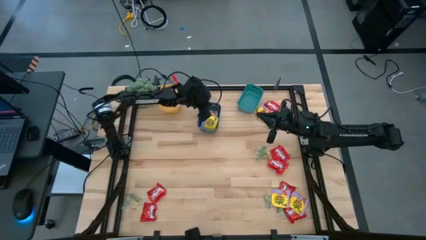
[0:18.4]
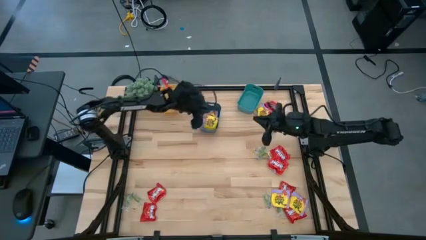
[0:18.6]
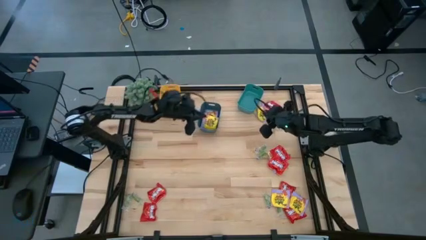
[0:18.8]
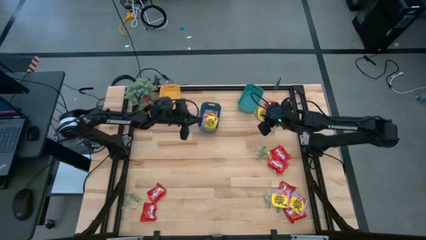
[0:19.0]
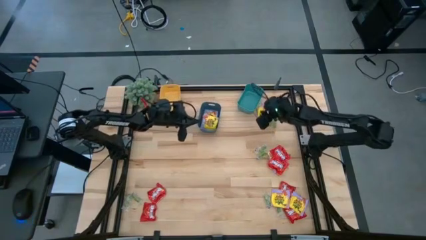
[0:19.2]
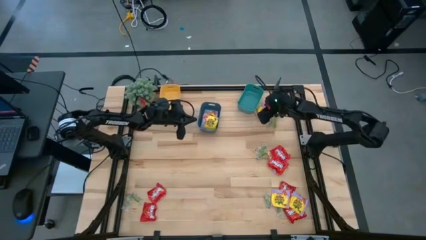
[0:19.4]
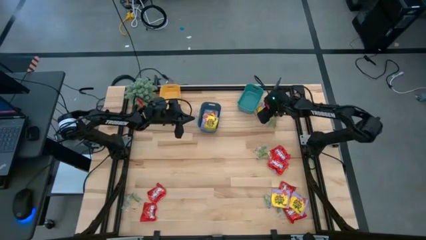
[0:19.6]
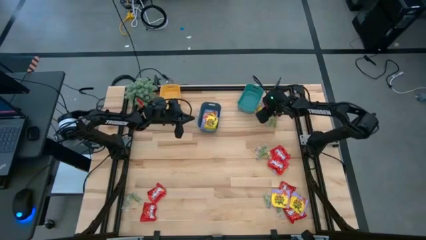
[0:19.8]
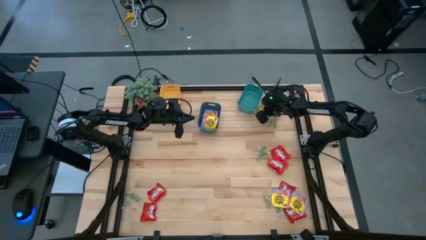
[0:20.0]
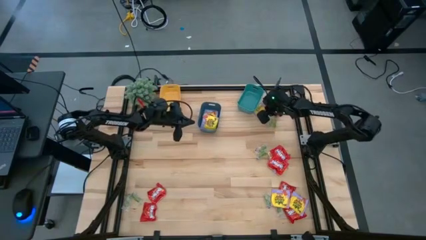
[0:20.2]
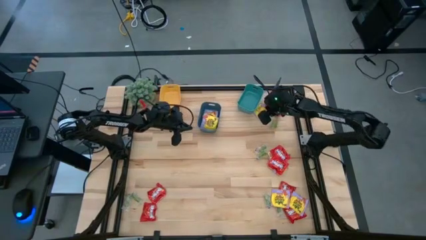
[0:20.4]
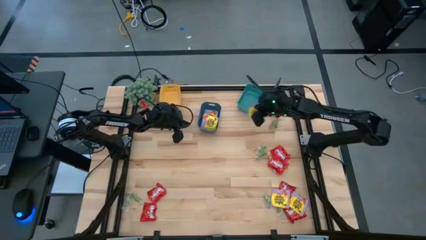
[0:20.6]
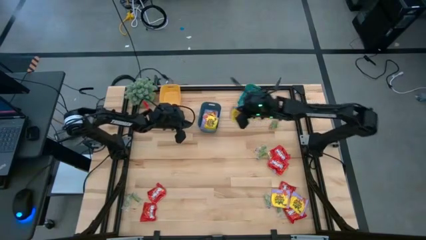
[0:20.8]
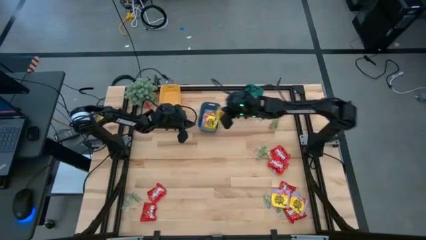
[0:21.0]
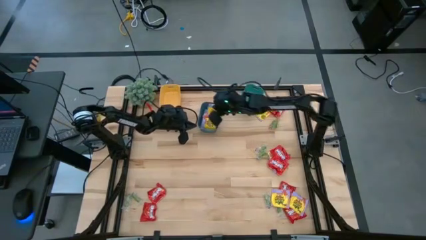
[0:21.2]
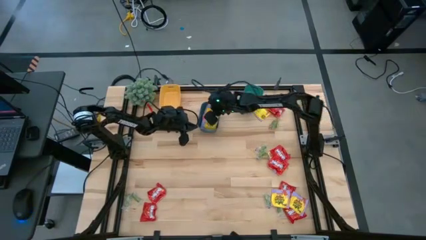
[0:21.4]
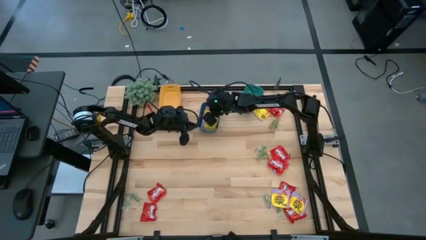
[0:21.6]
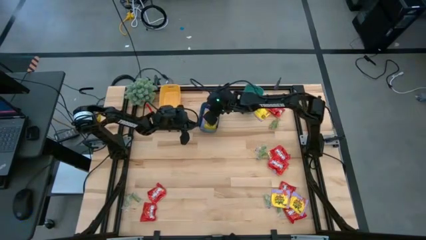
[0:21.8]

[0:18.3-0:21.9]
Task: Sort candy
Put the yellow candy pack into the blue bin

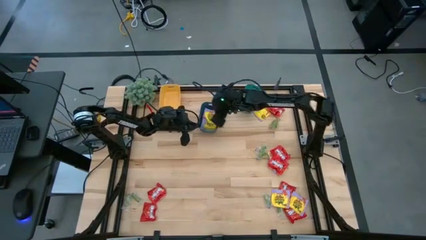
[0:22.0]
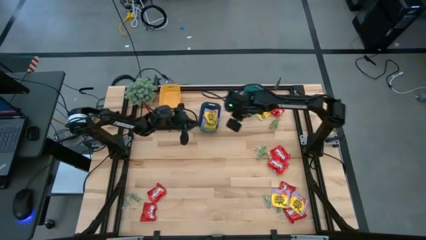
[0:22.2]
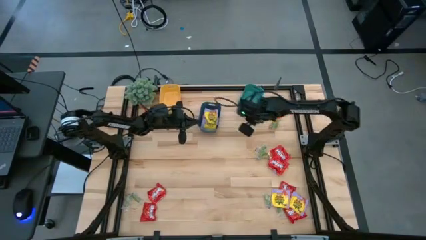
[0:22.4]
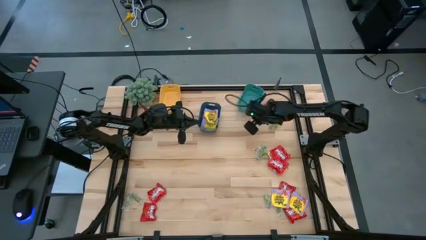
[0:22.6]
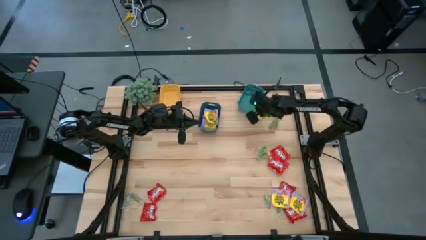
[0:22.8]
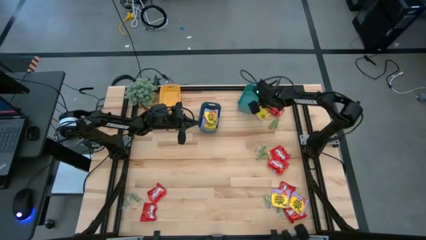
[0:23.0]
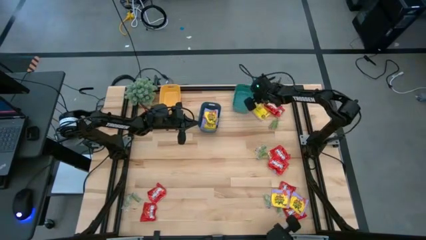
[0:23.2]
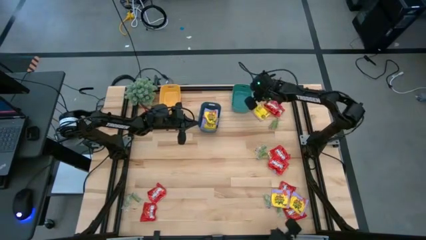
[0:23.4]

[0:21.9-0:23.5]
Adjust the green bin

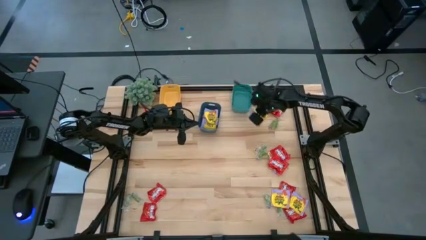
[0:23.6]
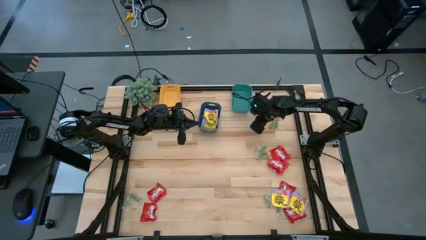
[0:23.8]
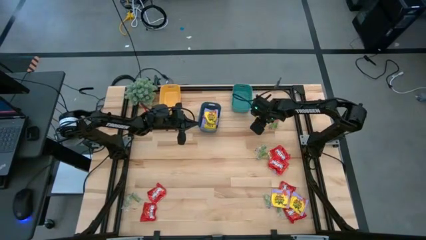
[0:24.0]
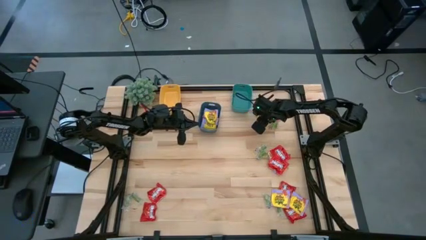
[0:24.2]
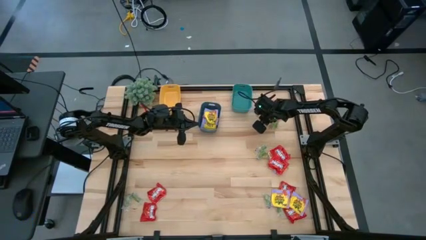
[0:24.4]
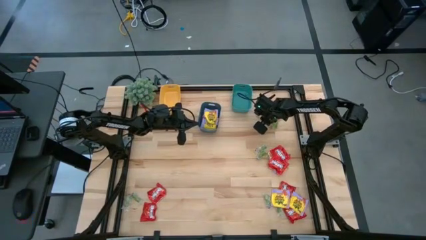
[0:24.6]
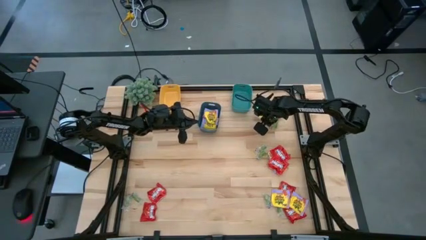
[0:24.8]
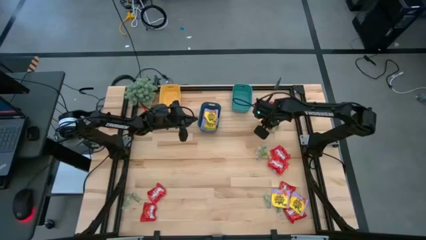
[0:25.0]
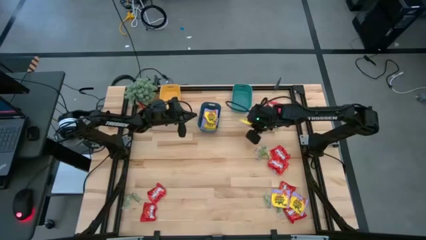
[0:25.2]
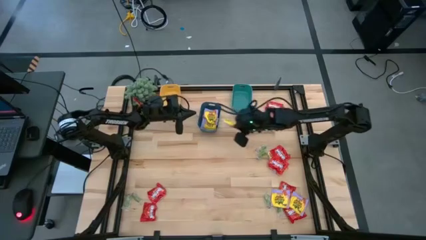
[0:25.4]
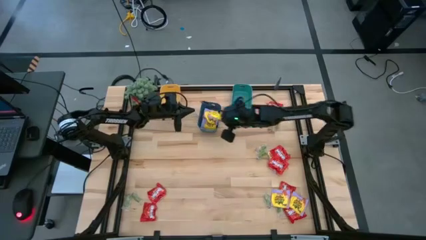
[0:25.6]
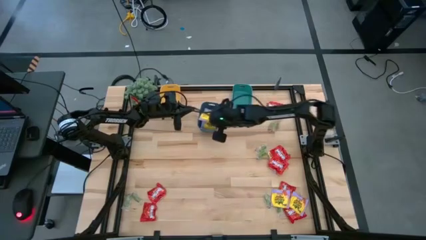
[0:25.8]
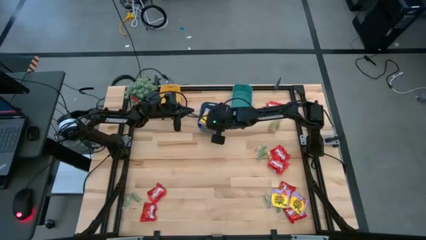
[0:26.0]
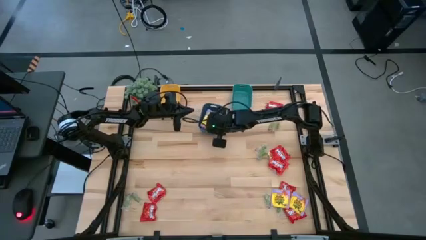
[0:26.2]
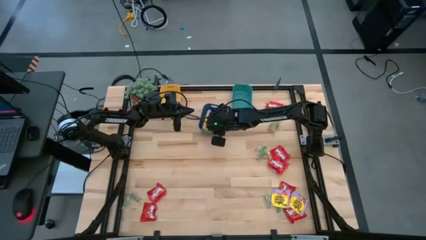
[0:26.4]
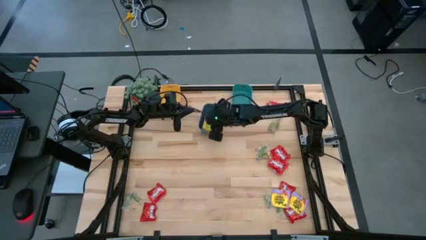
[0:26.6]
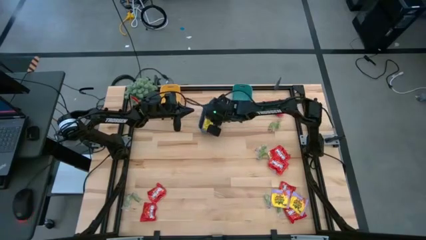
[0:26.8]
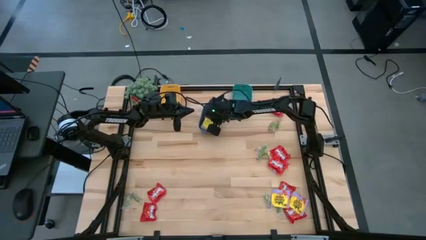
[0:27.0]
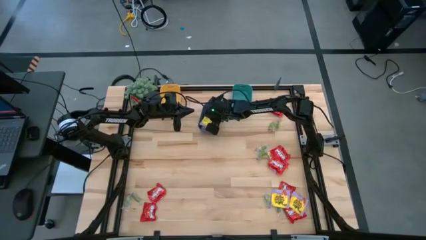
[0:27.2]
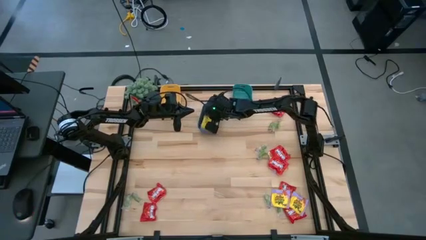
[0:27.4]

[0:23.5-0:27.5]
Put the yellow candy pack into the blue bin

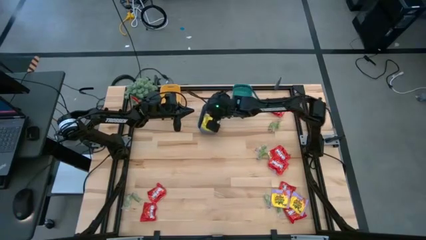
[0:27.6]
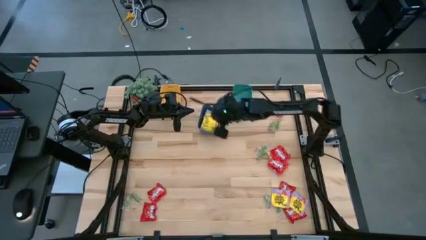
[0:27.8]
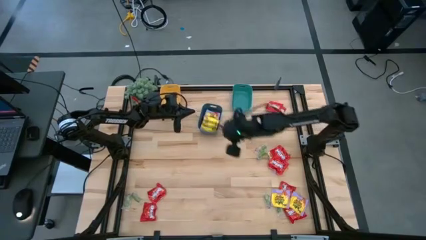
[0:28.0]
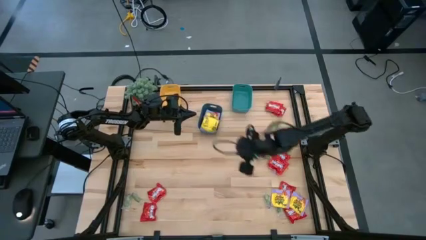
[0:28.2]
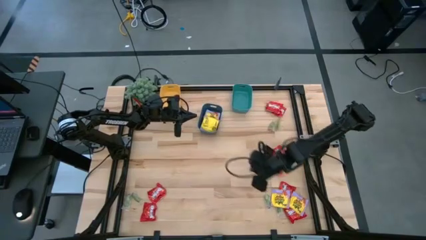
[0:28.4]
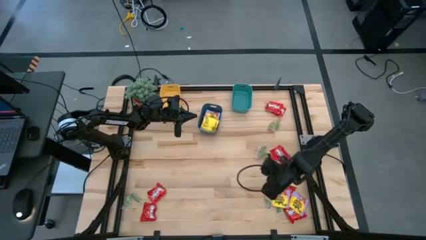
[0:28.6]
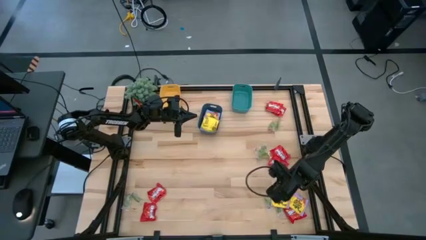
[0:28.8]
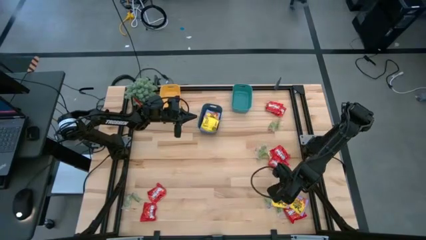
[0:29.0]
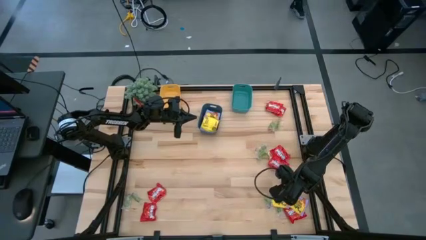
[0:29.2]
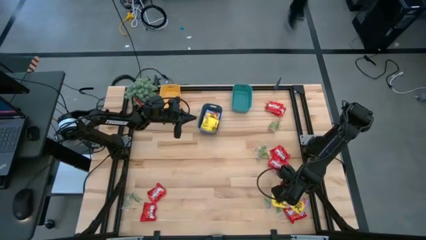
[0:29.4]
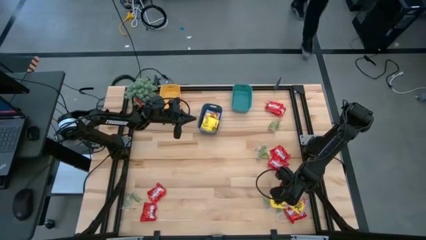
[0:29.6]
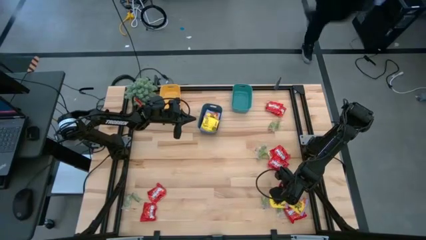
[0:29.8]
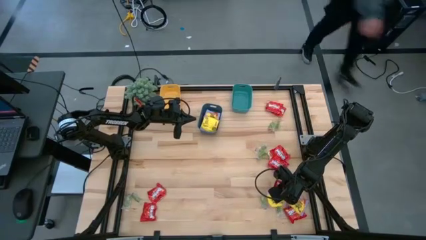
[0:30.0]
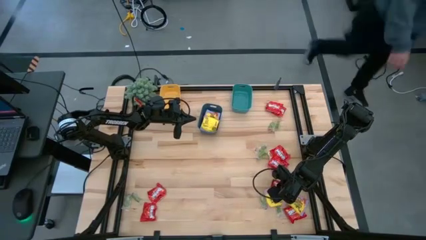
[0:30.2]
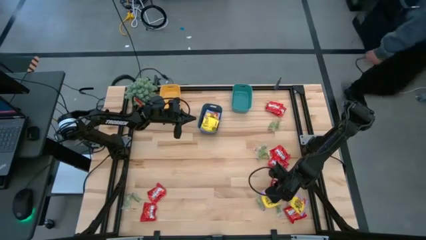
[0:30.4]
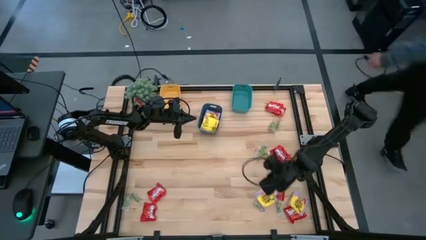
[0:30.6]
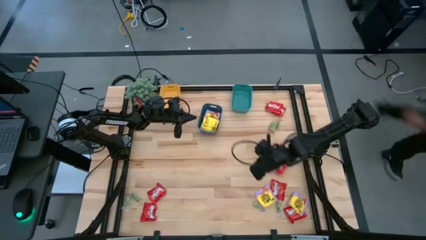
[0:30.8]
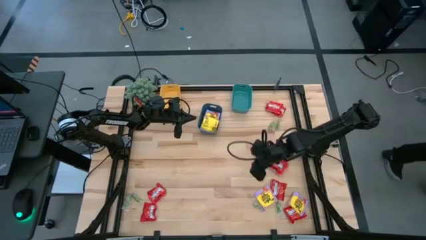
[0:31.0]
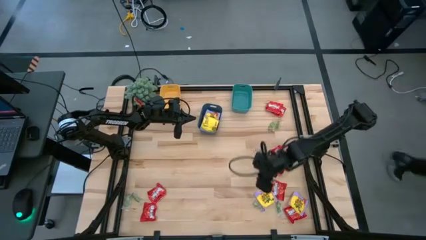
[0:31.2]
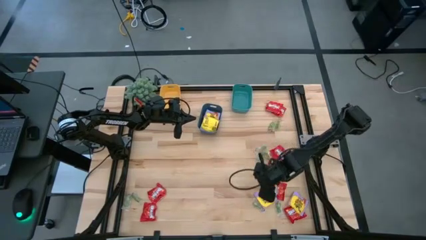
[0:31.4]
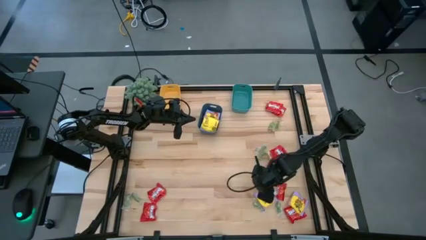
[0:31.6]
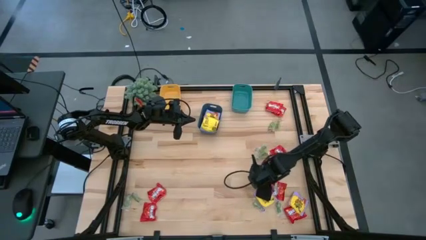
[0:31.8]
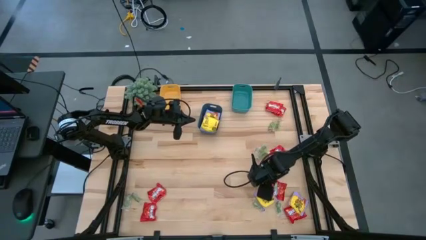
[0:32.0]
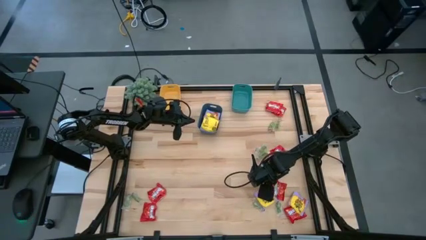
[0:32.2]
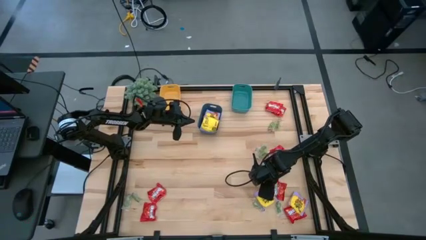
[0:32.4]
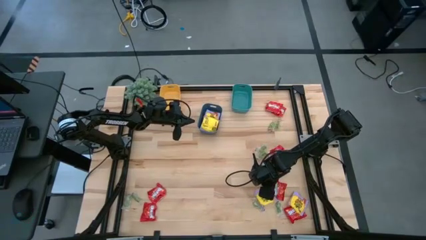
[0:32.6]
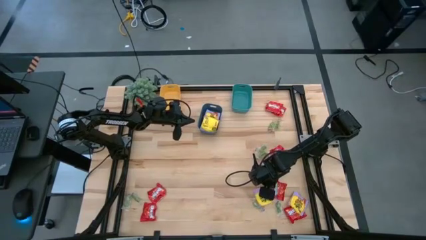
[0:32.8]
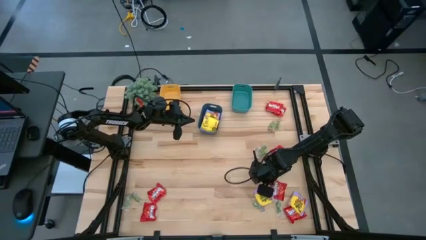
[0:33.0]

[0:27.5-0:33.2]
Put the yellow candy pack into the blue bin

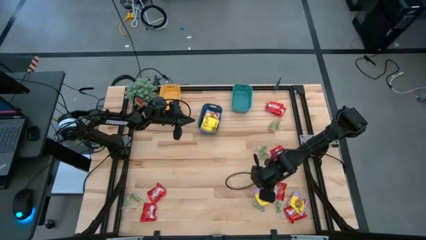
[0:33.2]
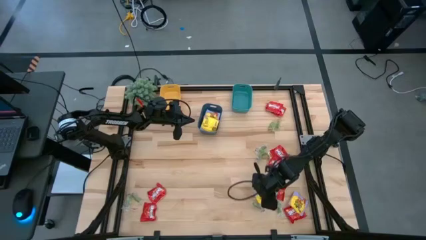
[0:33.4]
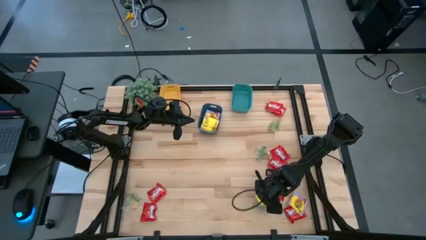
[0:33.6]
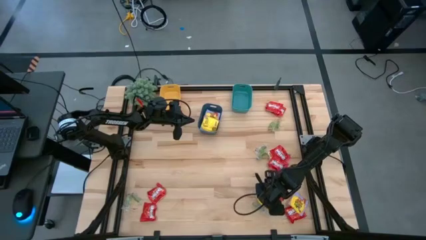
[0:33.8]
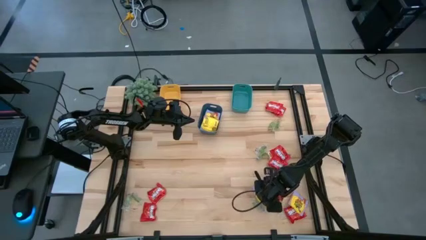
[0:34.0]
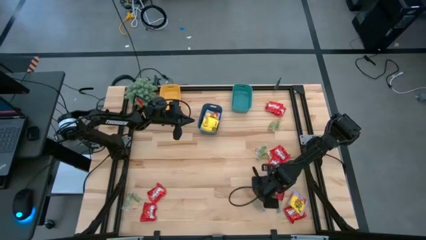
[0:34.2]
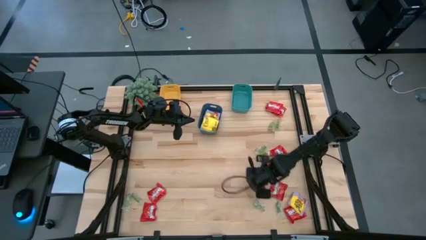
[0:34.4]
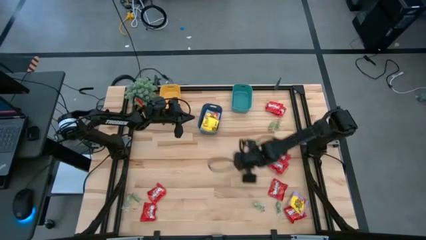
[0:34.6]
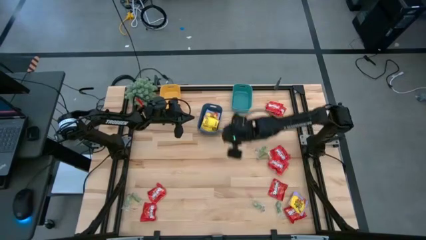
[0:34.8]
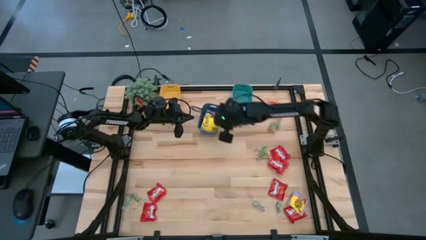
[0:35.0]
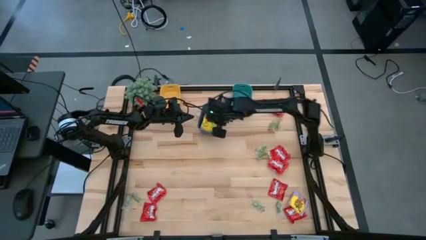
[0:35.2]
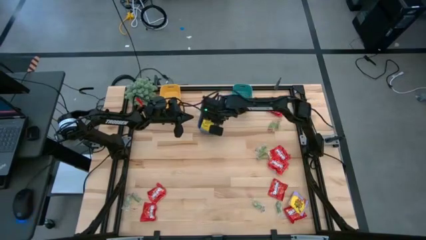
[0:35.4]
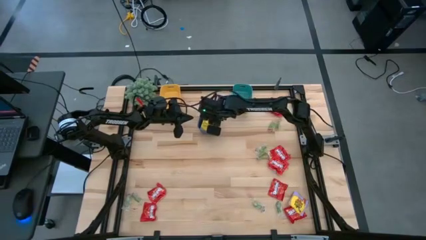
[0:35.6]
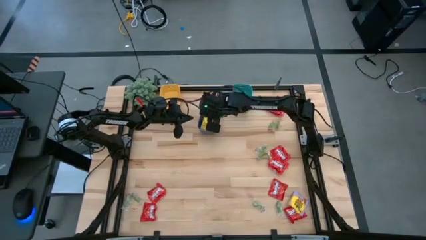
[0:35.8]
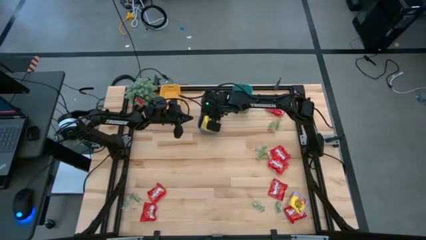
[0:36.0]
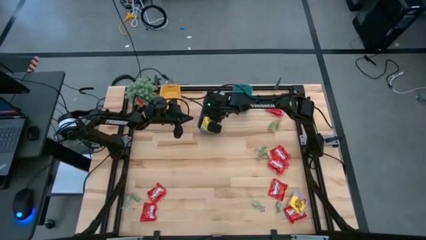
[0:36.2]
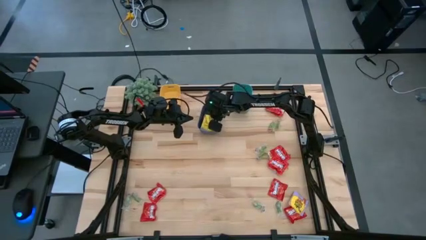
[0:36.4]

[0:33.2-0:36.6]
Put the yellow candy pack into the blue bin
